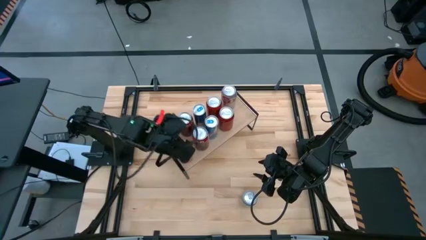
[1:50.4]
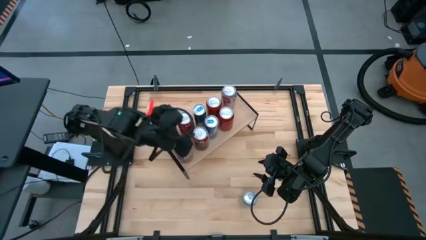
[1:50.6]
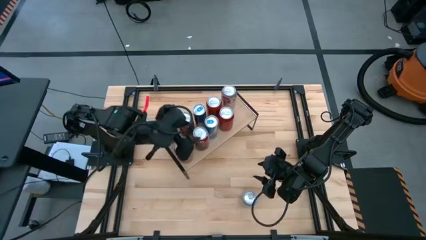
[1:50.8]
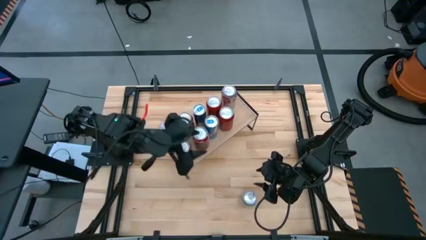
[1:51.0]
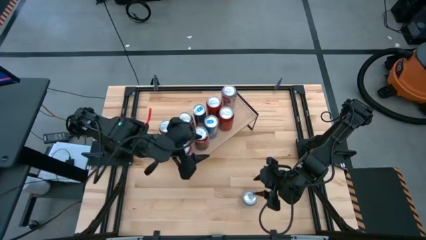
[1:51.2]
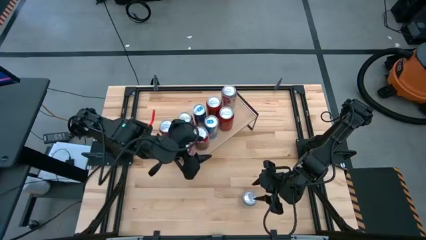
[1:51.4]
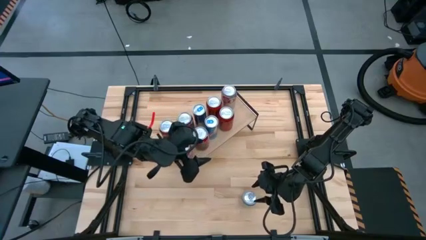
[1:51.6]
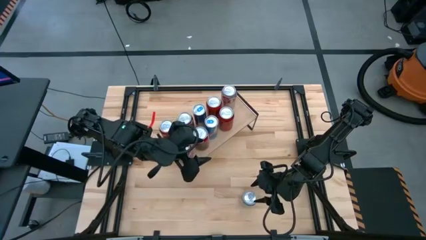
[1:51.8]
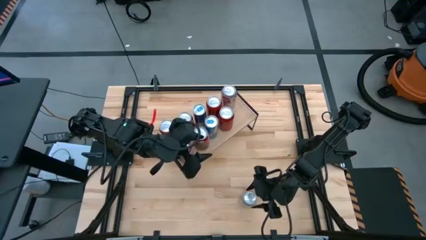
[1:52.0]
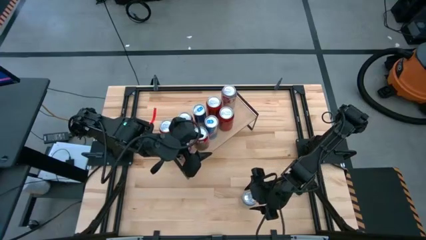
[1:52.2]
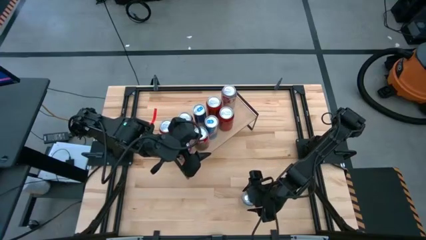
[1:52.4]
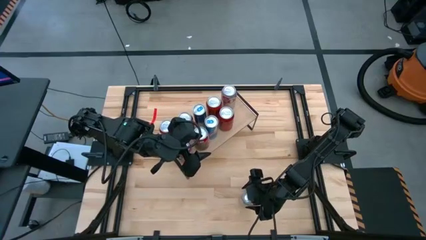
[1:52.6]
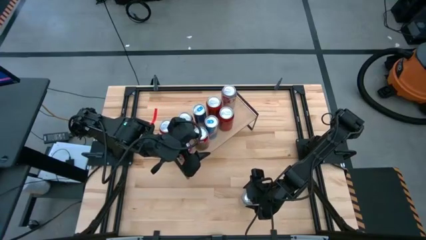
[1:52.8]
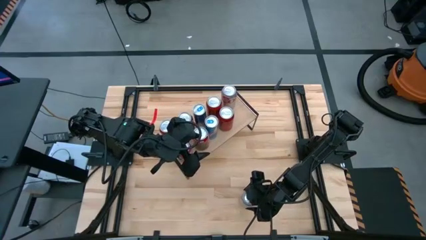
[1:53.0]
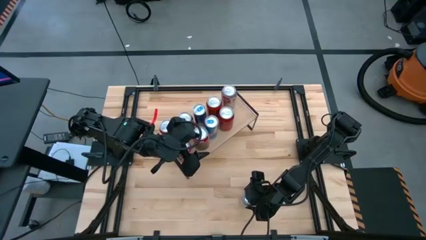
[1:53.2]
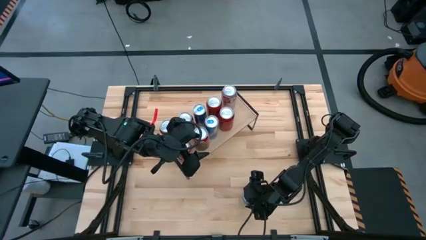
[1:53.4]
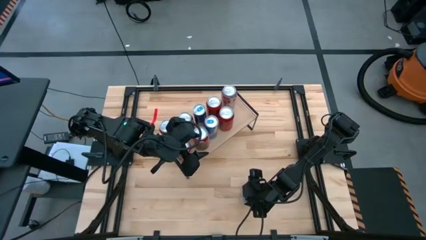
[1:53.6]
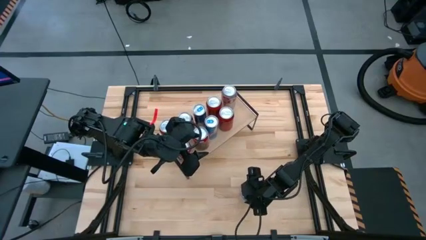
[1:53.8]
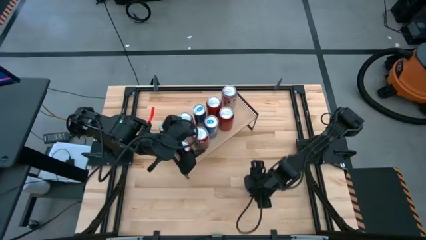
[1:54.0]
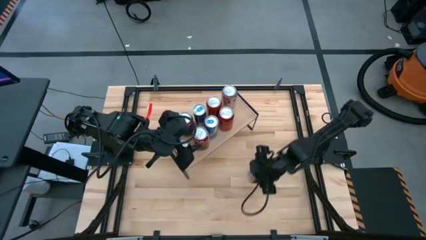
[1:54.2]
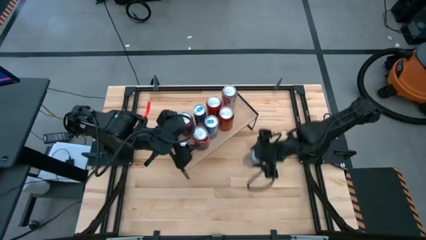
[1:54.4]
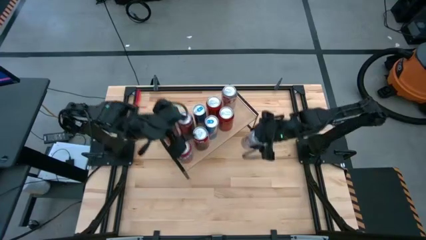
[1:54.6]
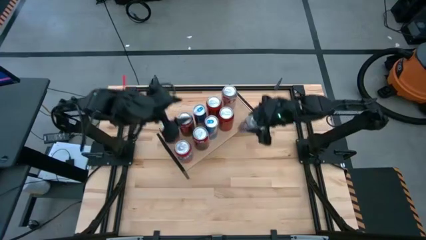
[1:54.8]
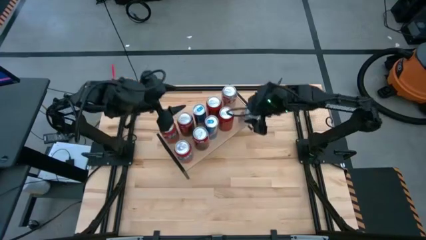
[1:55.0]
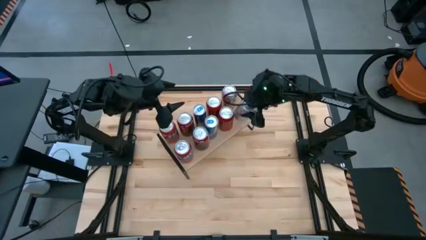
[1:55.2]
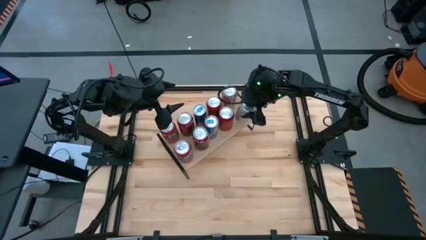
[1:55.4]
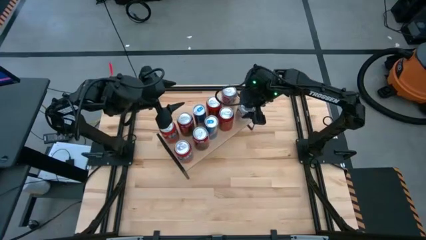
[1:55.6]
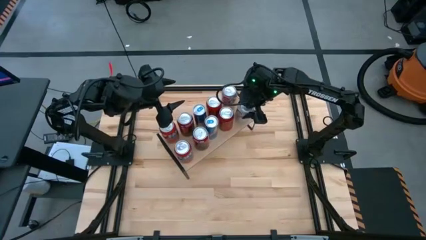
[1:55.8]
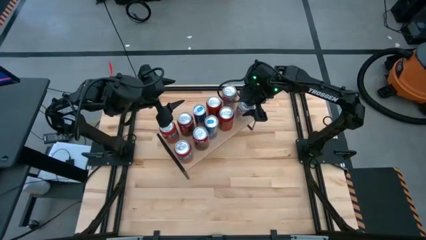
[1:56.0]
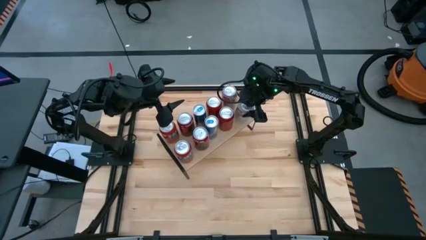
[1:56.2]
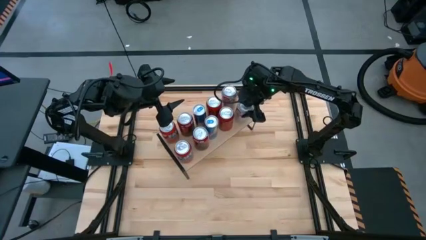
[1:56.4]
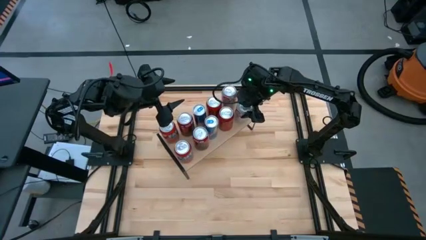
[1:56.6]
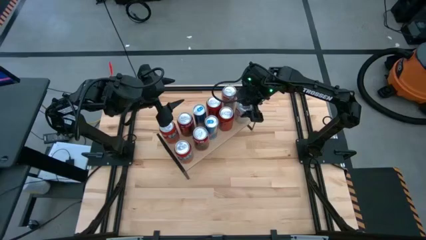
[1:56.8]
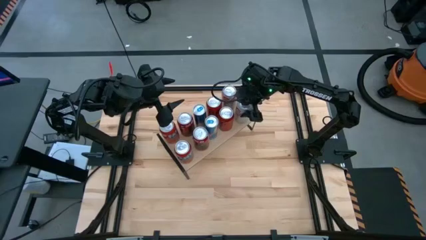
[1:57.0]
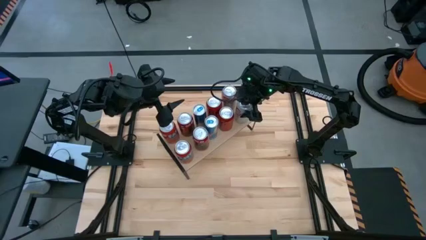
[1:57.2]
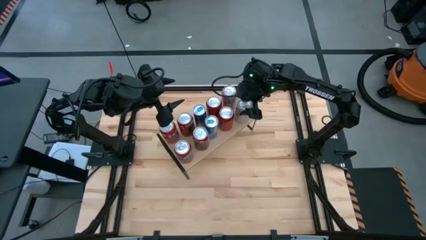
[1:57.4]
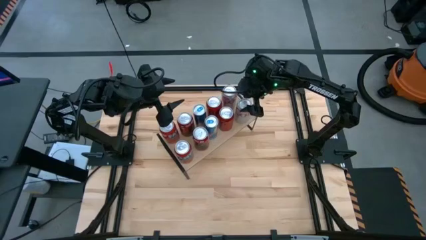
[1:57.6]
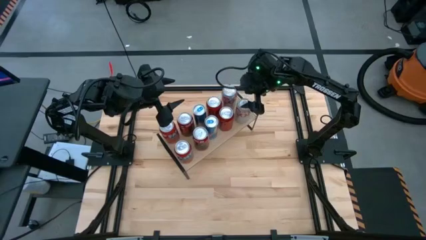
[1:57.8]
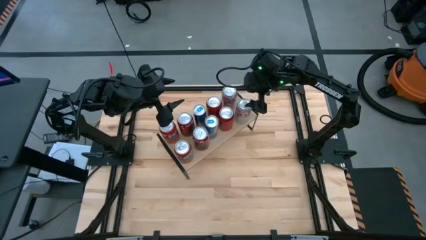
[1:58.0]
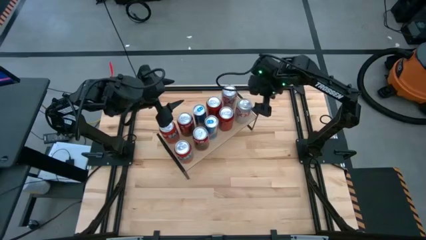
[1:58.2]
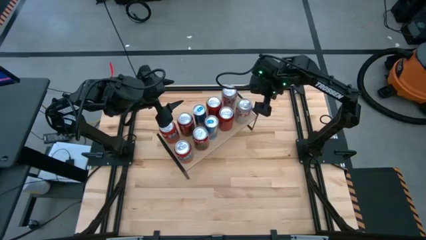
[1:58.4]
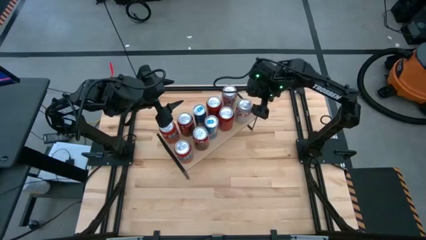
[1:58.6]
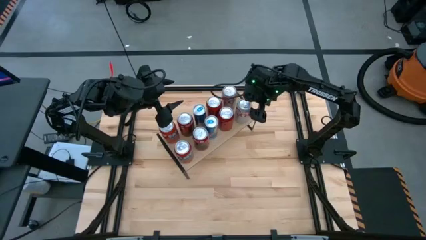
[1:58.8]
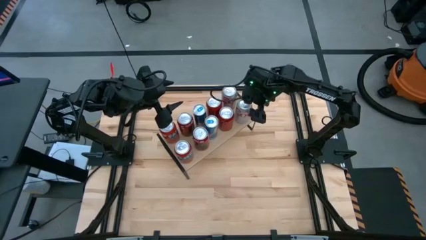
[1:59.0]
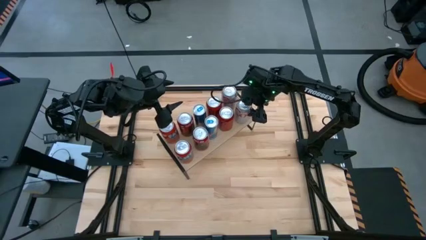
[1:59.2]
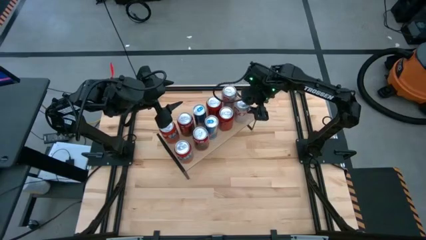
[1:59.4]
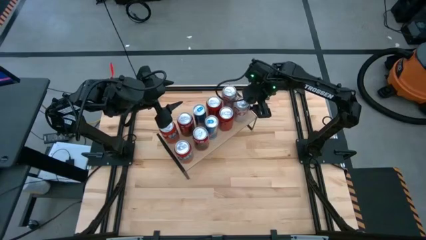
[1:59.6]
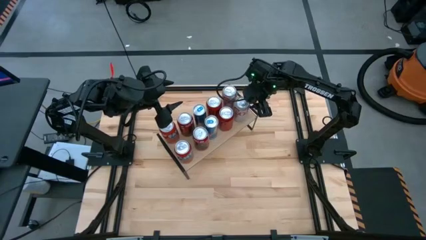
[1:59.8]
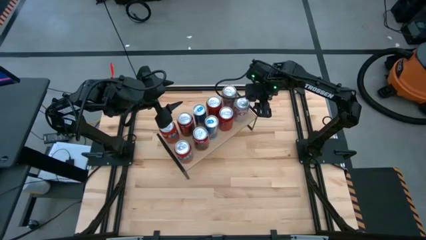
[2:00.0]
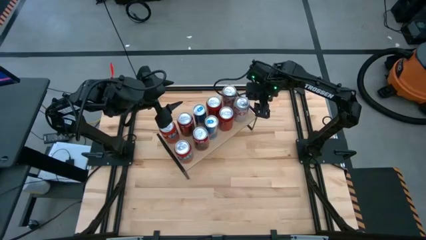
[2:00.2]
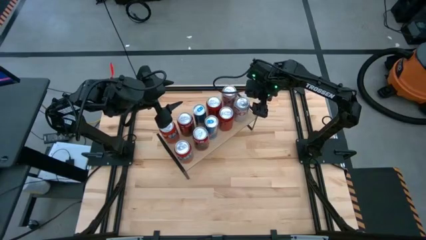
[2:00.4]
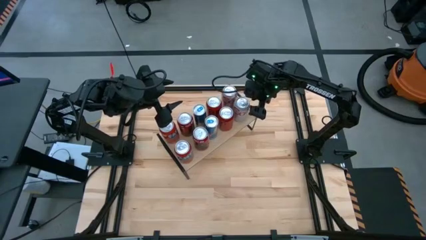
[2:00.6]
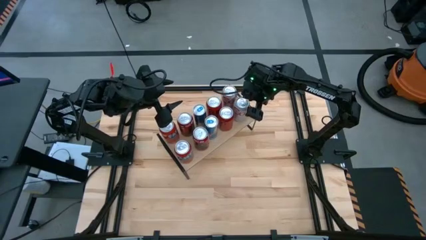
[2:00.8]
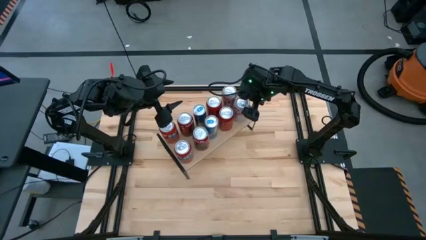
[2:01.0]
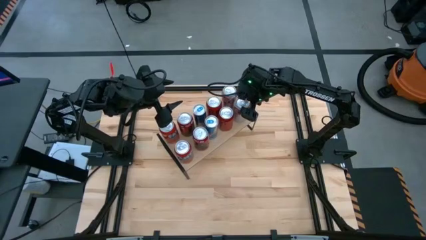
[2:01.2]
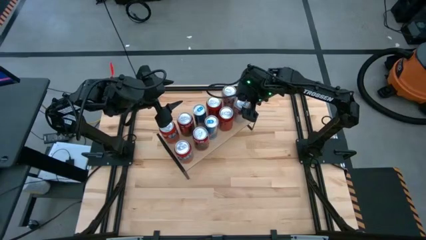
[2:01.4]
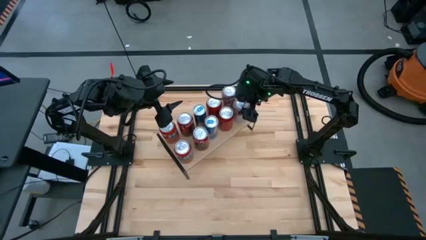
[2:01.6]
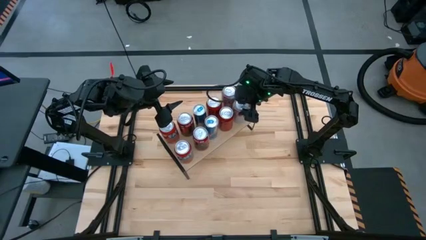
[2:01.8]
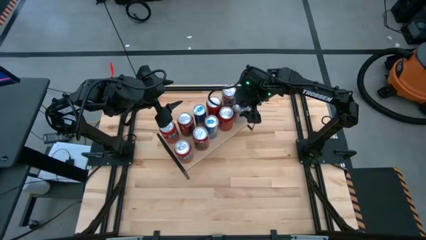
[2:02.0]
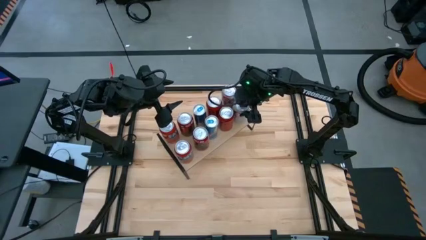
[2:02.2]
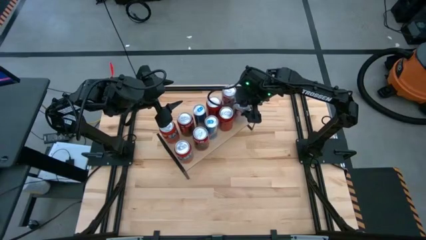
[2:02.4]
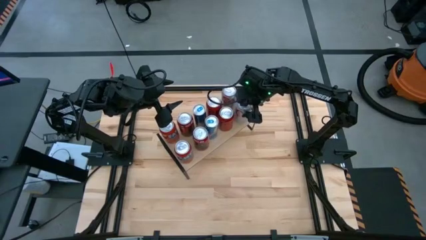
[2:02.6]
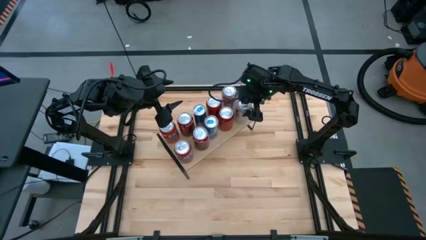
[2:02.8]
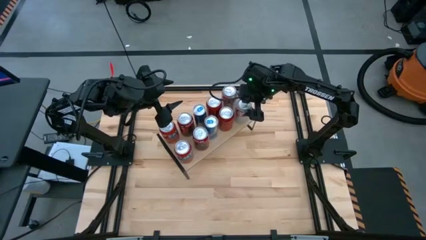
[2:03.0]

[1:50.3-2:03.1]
Task: Place canned beverage on shelf
Put the red and silver soda can on the shelf and aligned with the other red and silver soda can on the shelf

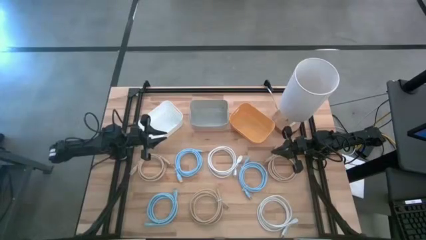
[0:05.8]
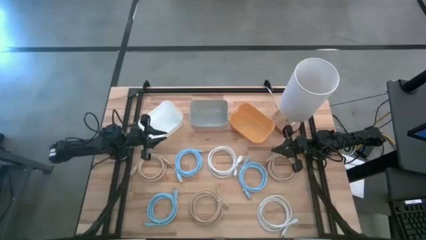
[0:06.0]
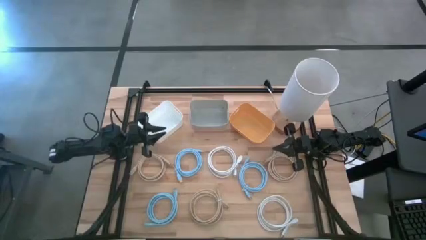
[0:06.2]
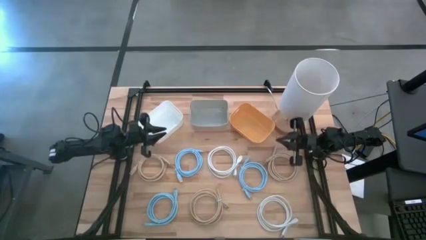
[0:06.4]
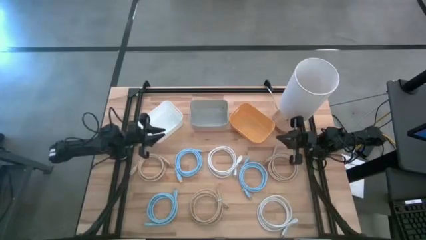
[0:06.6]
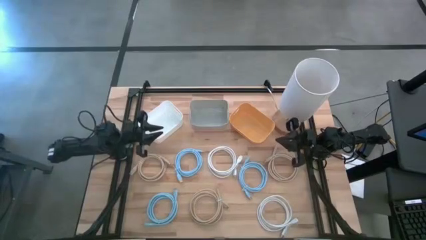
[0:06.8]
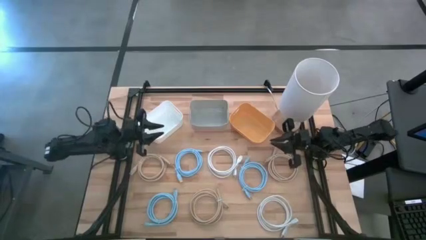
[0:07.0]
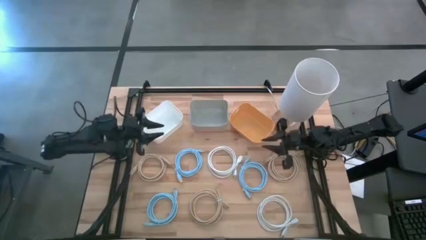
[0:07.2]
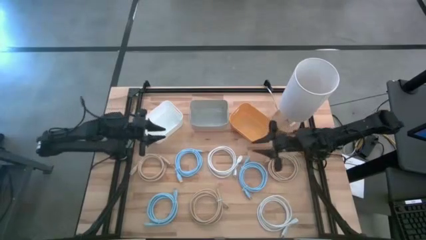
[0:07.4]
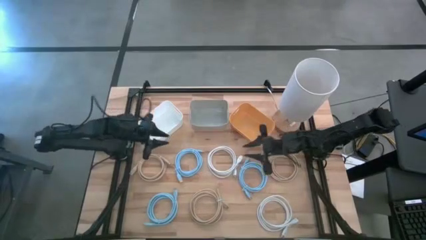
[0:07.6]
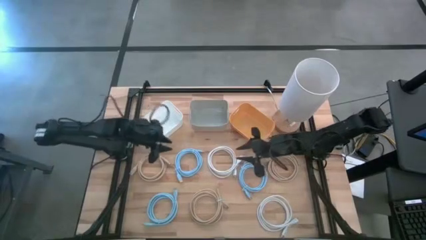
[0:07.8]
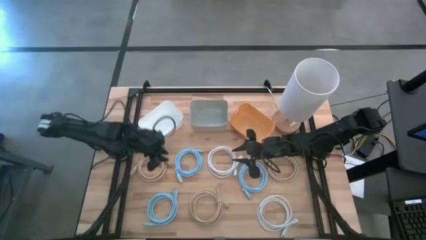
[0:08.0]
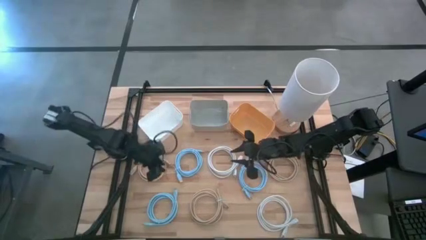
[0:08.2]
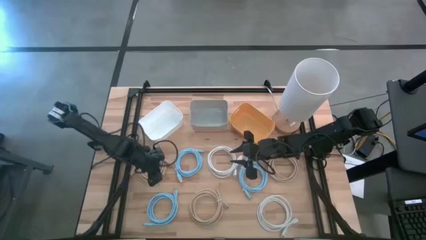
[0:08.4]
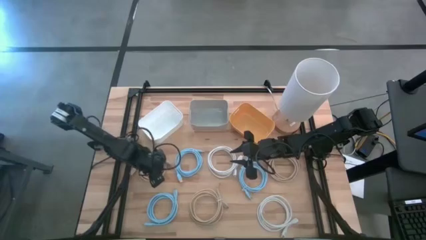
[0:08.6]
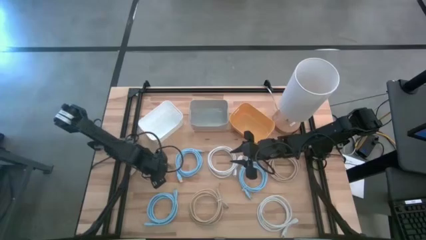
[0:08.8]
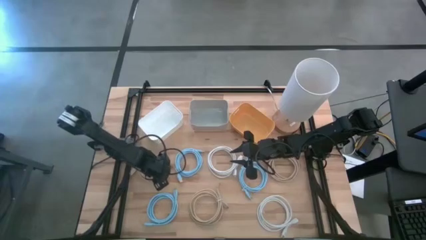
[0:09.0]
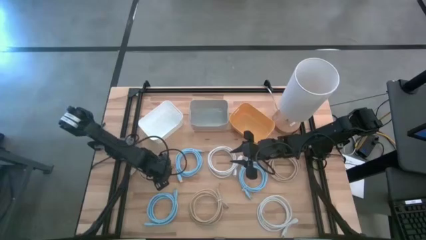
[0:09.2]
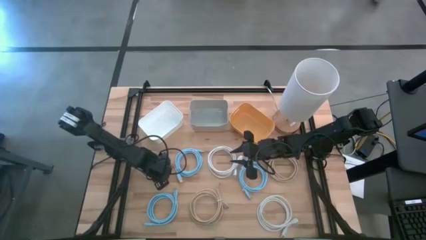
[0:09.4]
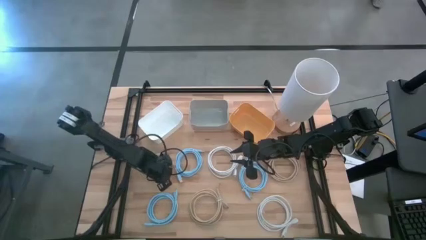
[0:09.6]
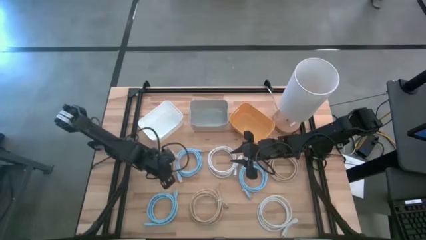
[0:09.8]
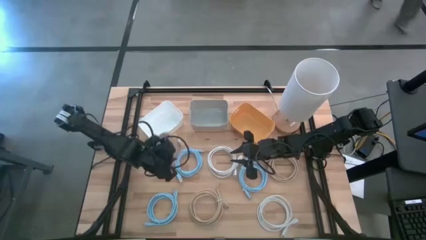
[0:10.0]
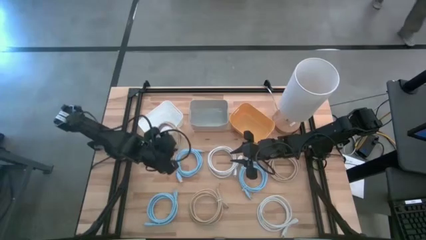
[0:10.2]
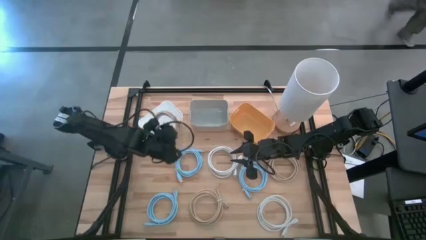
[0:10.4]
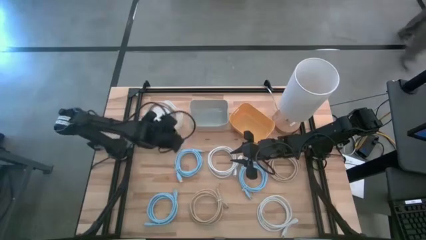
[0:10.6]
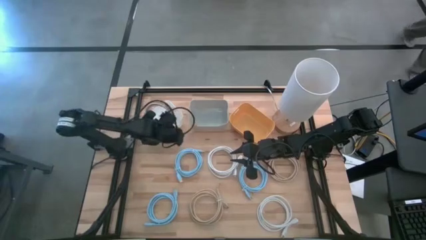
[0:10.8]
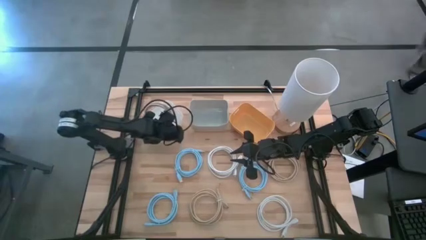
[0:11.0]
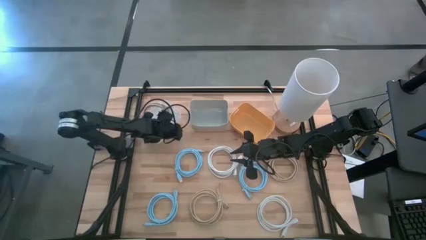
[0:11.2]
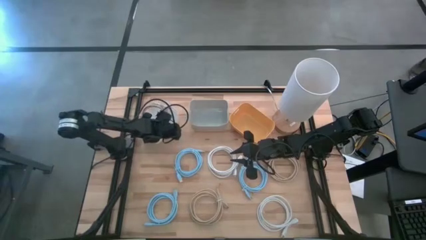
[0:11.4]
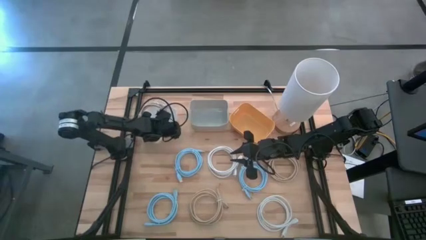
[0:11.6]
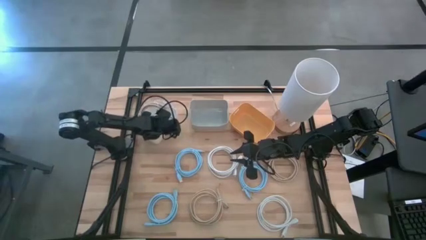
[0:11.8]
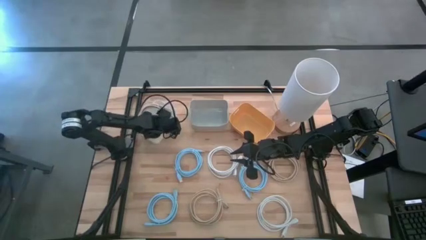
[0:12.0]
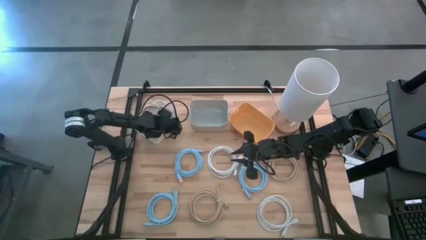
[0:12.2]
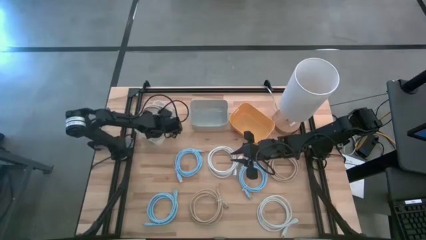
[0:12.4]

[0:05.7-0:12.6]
Task: Sort HDMI cables
Put the top left brown HDMI cable into the white bin
